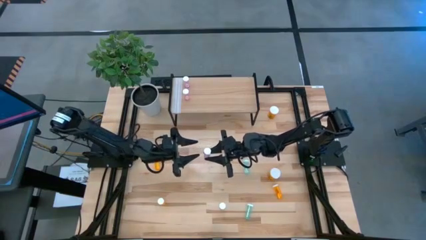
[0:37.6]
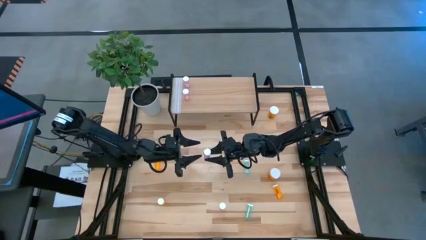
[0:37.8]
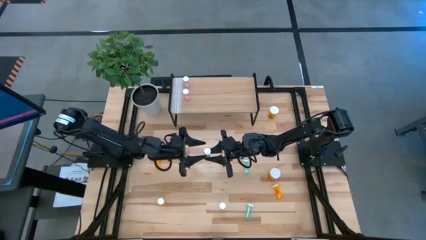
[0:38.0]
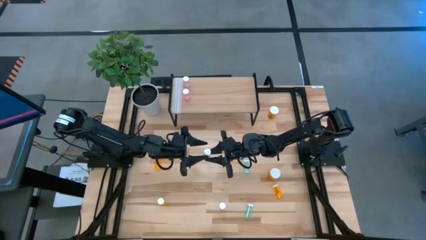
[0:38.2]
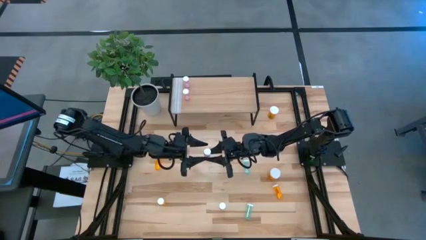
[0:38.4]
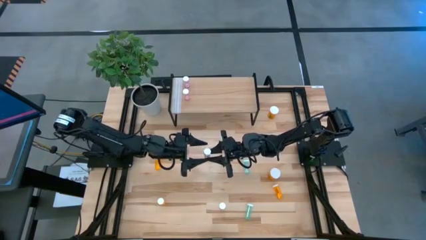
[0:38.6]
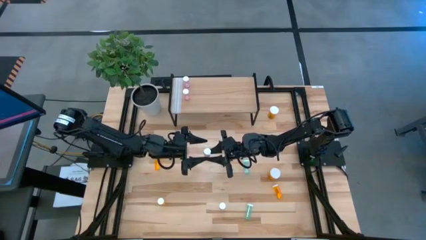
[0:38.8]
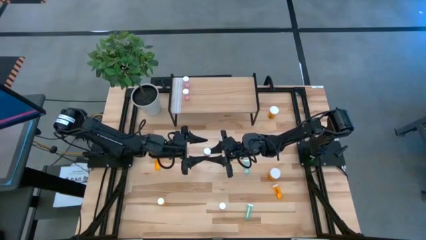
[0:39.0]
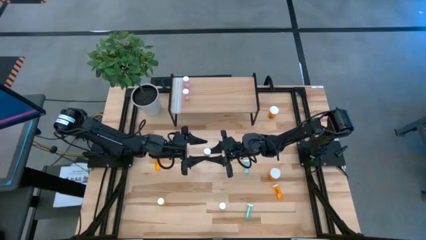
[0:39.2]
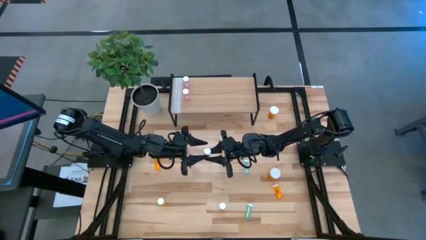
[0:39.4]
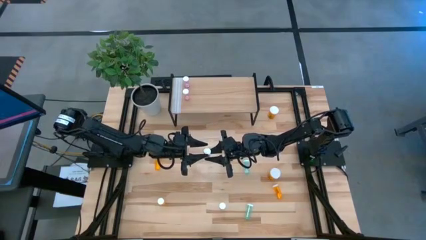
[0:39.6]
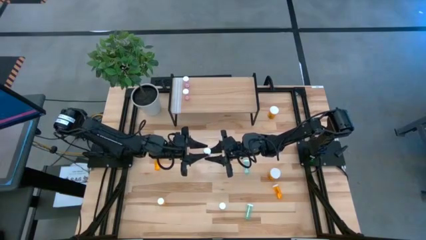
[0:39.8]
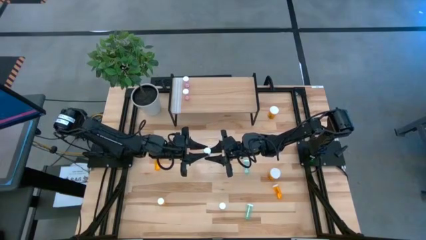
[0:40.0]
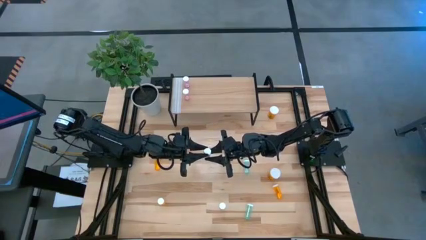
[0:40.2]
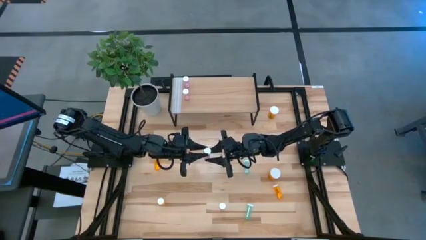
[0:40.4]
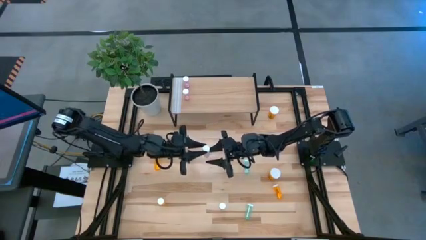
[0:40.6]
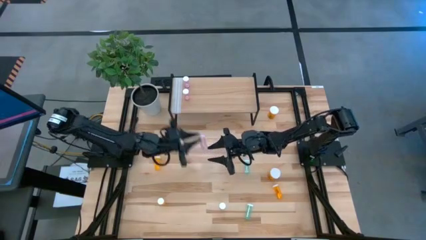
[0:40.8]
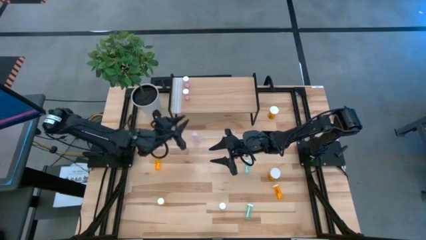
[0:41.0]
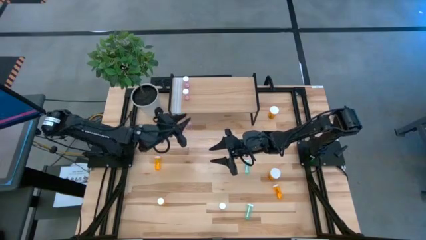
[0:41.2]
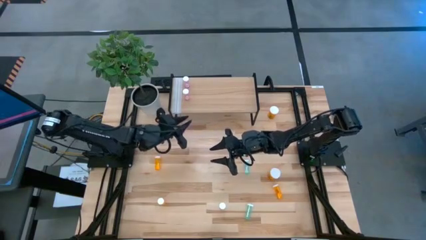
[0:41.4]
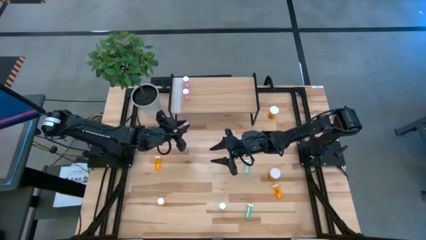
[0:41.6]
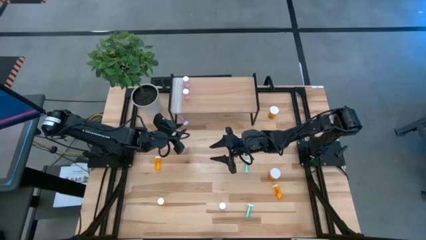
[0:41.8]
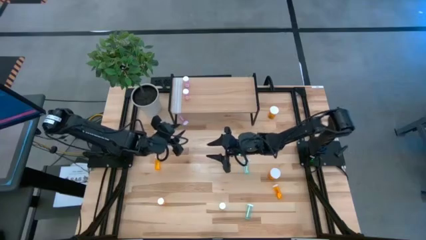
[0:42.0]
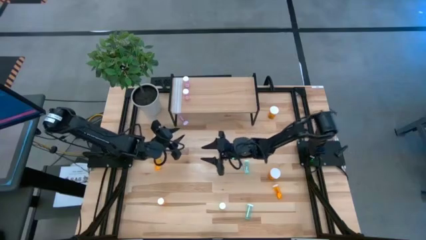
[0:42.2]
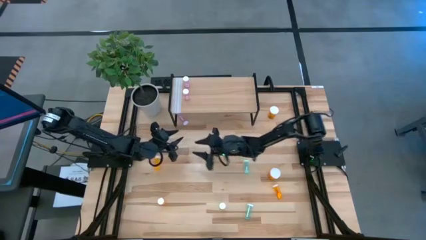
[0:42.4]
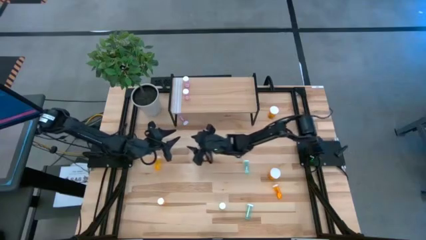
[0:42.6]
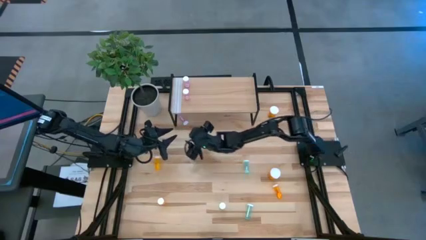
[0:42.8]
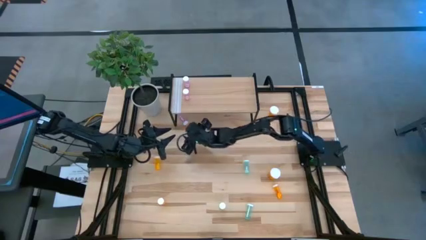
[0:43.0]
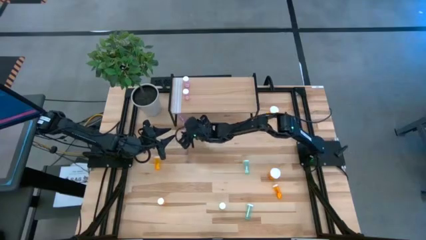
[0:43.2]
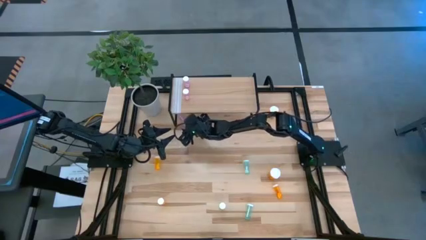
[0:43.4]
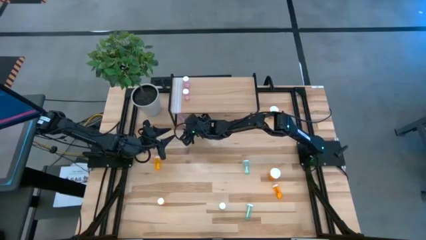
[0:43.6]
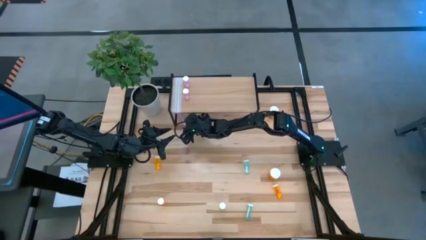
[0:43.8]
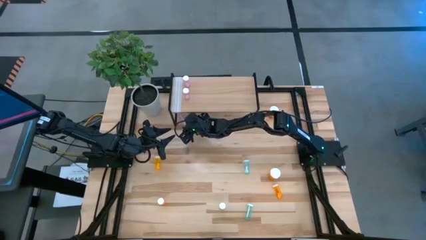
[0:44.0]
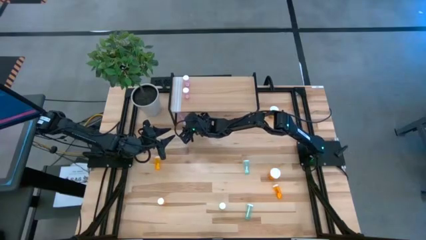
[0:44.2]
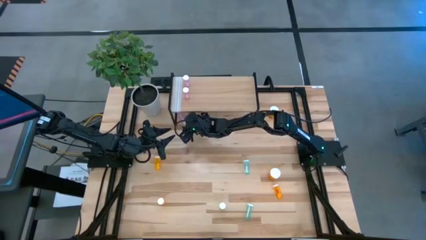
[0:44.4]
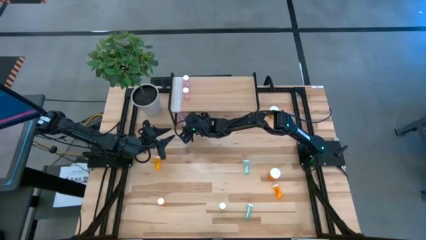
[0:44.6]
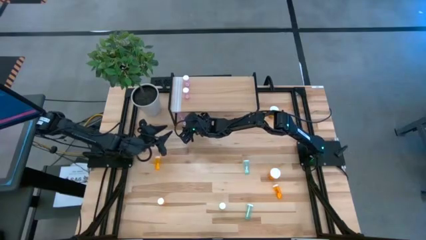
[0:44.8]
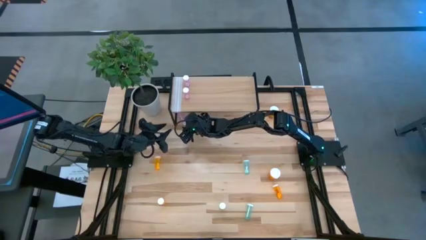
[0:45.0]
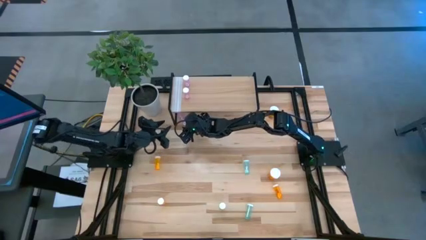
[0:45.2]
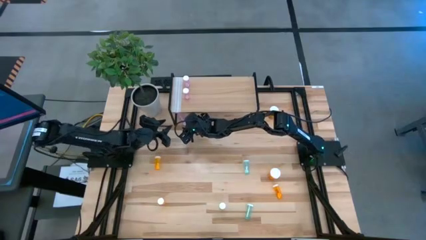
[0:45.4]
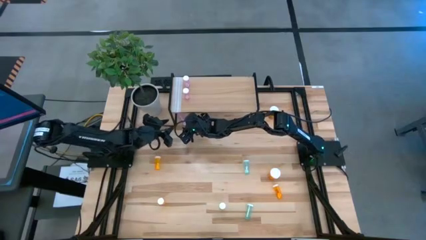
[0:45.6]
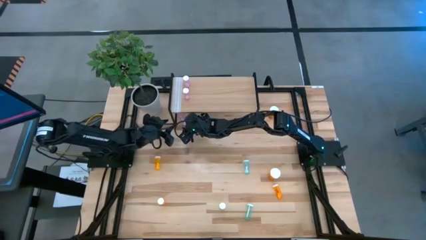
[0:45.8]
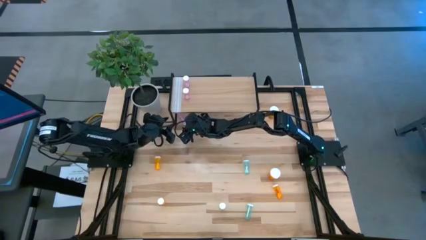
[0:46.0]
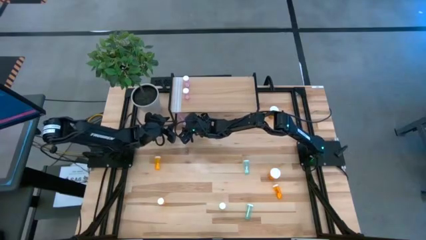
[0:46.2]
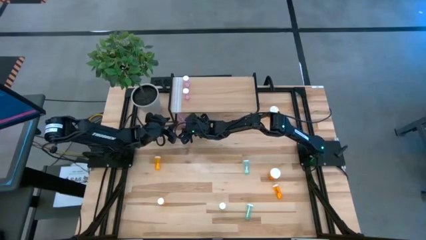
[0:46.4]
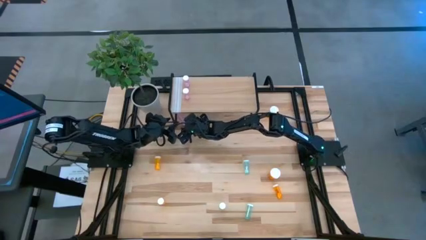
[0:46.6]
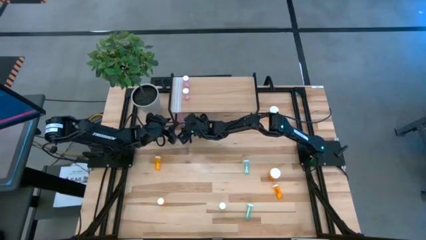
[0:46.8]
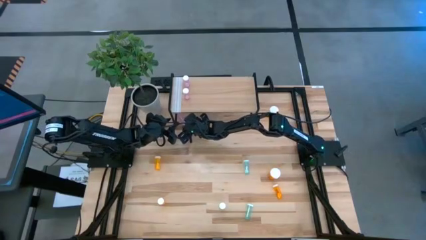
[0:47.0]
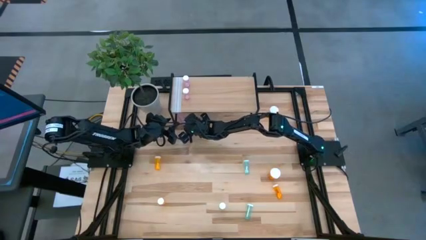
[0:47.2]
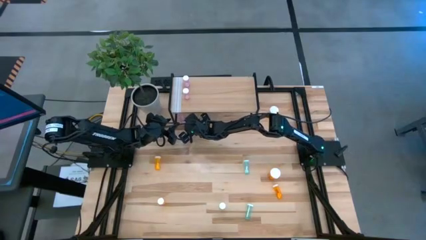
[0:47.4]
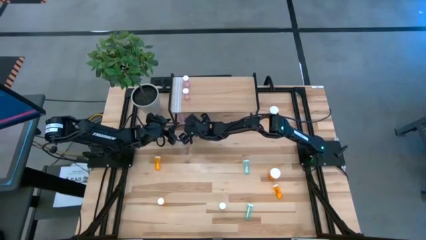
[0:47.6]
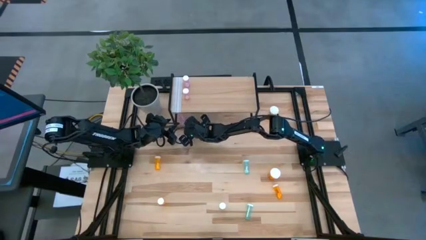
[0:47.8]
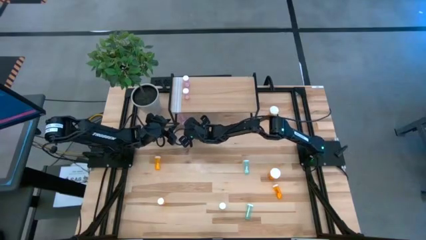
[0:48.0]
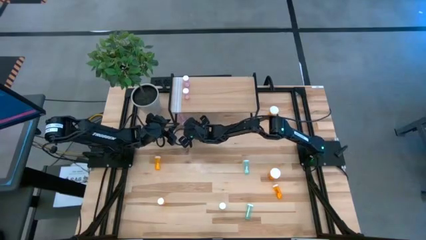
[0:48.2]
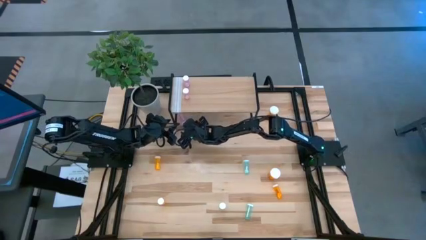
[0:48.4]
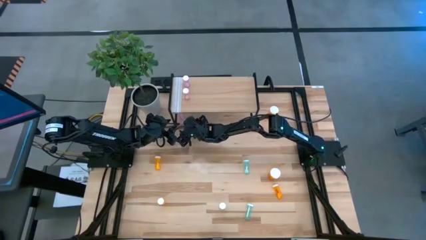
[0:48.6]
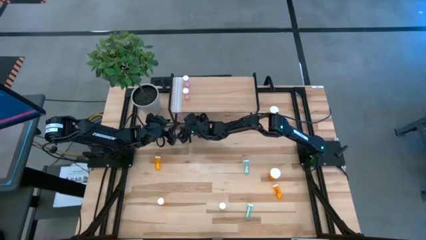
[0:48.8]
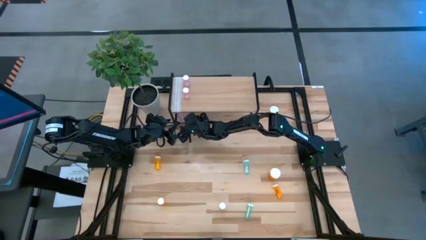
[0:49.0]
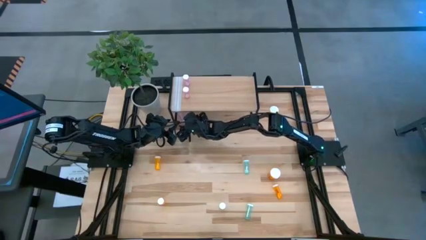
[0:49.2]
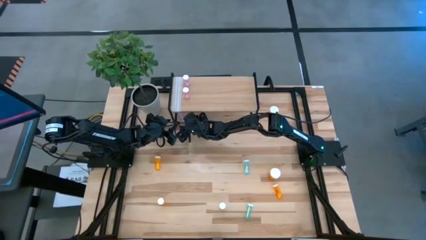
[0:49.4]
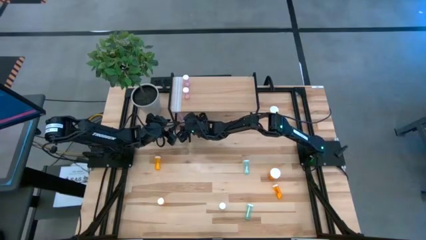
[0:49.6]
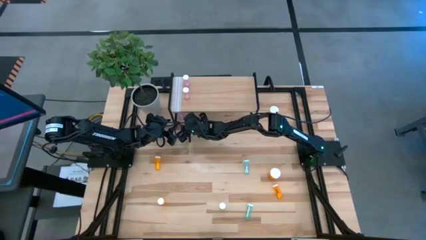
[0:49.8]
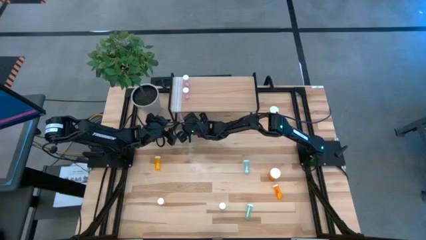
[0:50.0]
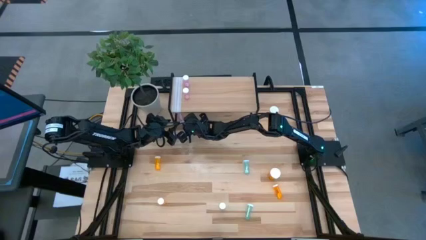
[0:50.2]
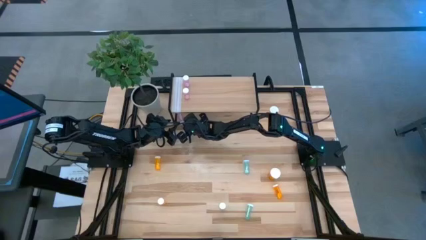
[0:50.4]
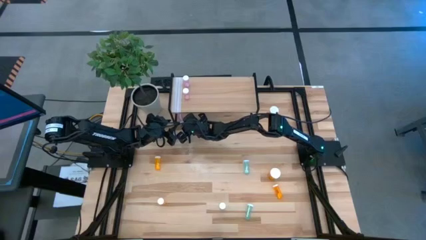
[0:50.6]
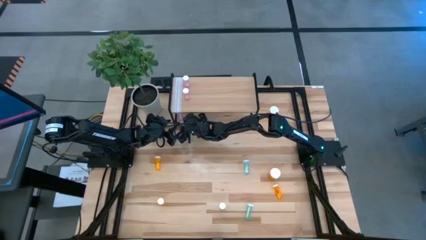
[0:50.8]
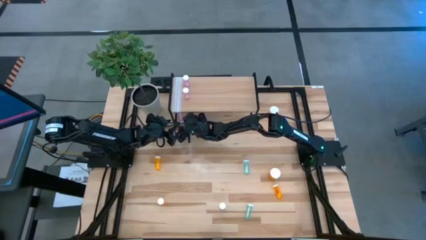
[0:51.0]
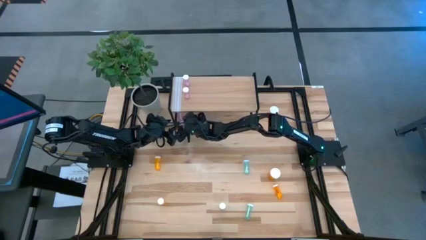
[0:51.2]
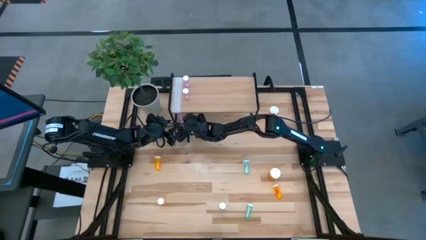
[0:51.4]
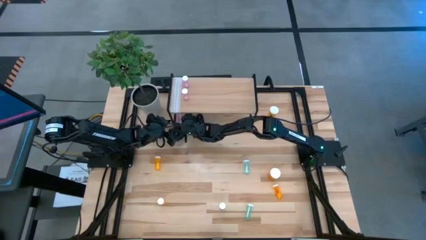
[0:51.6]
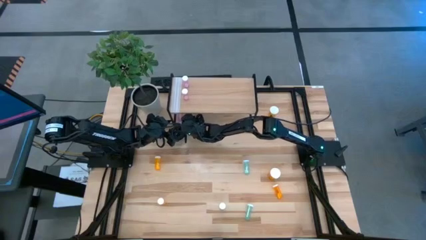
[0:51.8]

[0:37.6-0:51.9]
Task: Pick and place medicine bottles onto shelf by color
Put the pink pill bottle aligned with the other pink pill bottles on the shelf
